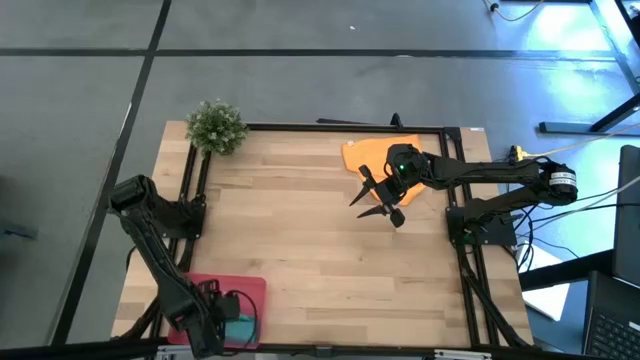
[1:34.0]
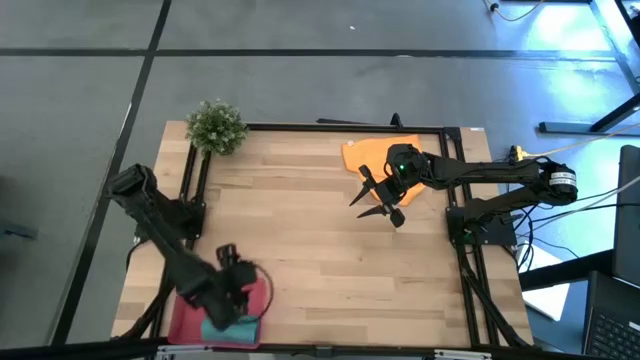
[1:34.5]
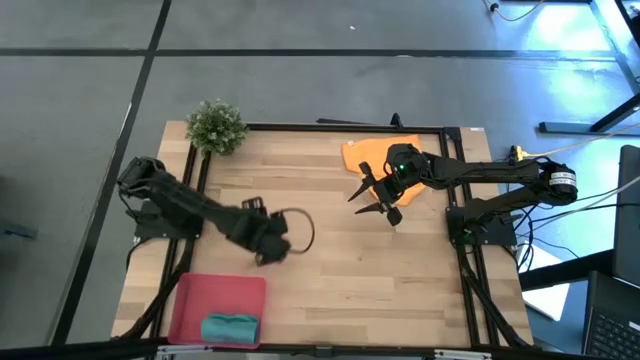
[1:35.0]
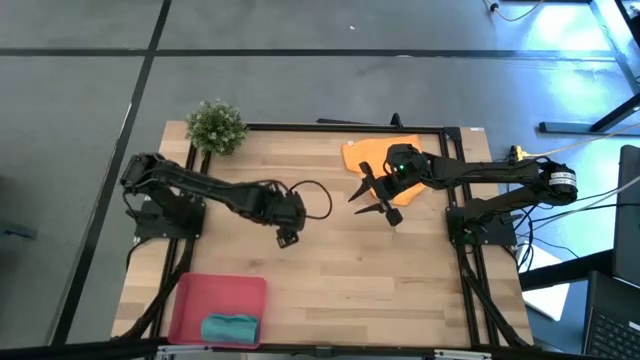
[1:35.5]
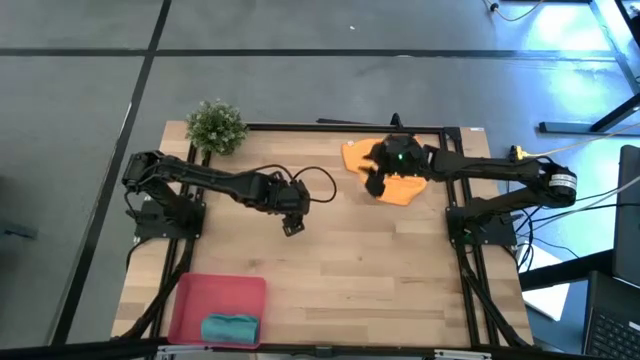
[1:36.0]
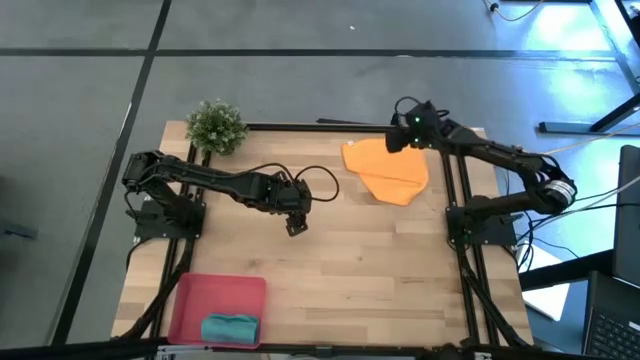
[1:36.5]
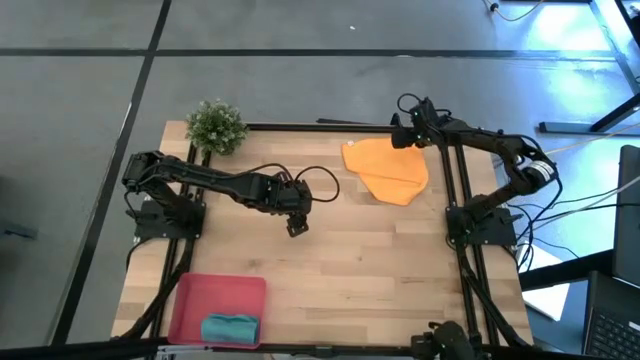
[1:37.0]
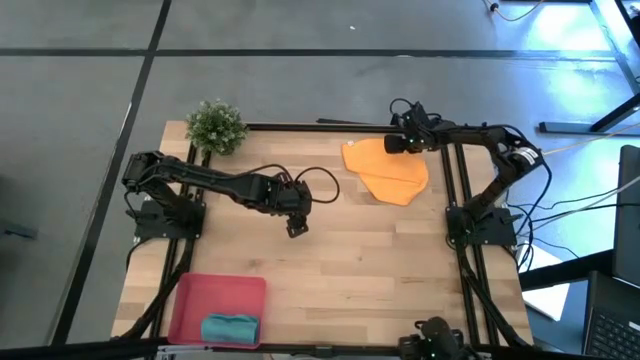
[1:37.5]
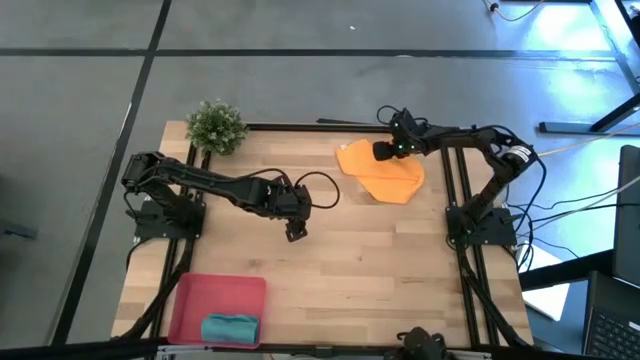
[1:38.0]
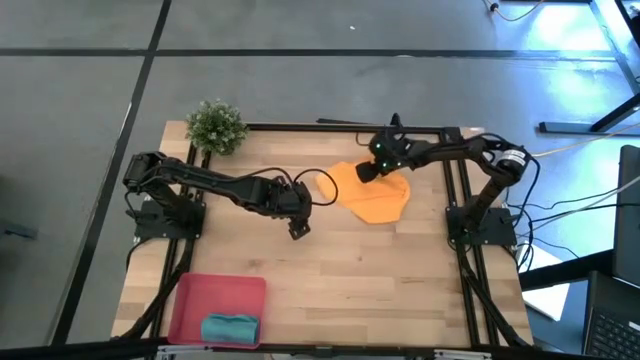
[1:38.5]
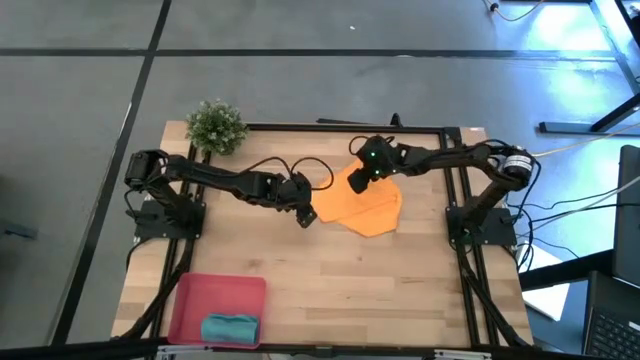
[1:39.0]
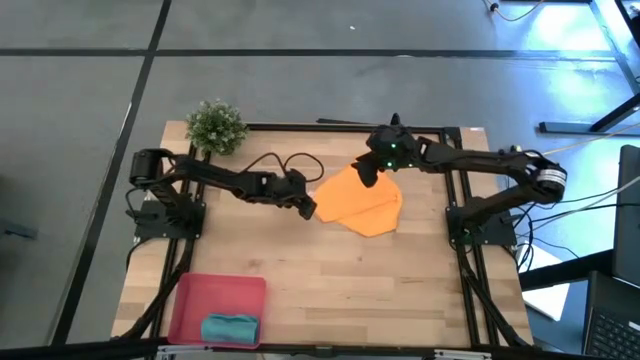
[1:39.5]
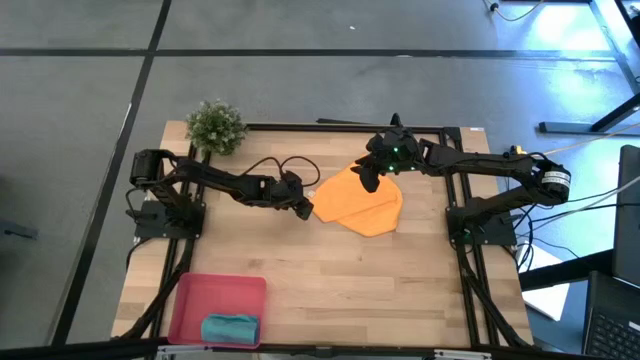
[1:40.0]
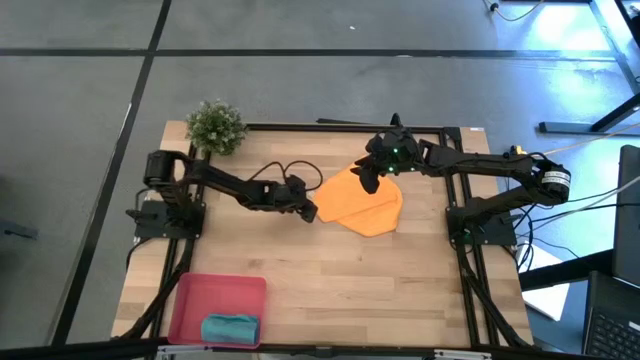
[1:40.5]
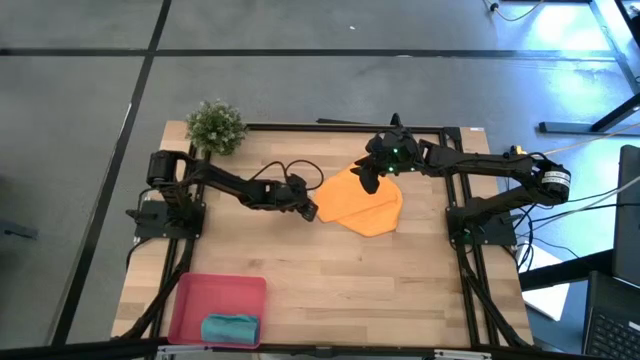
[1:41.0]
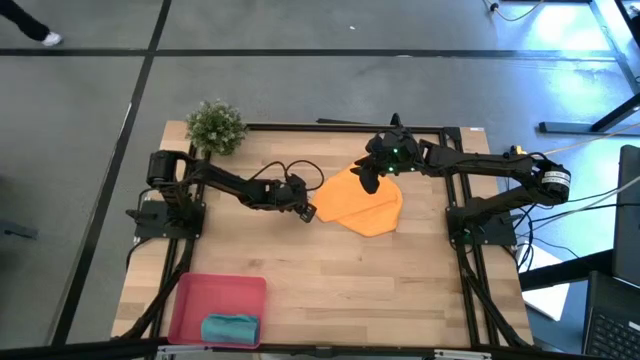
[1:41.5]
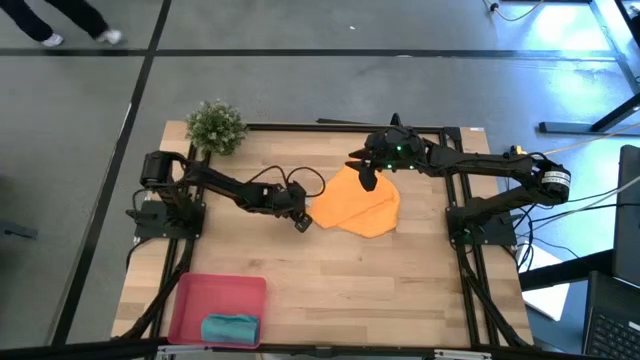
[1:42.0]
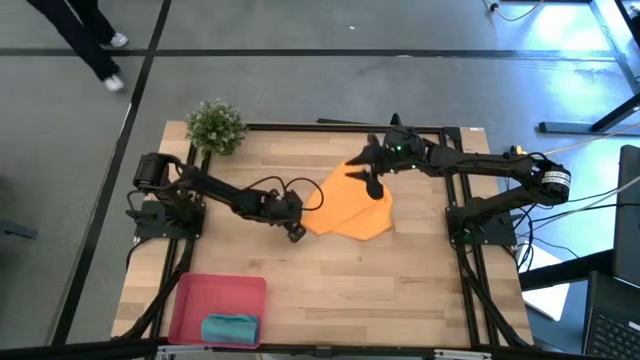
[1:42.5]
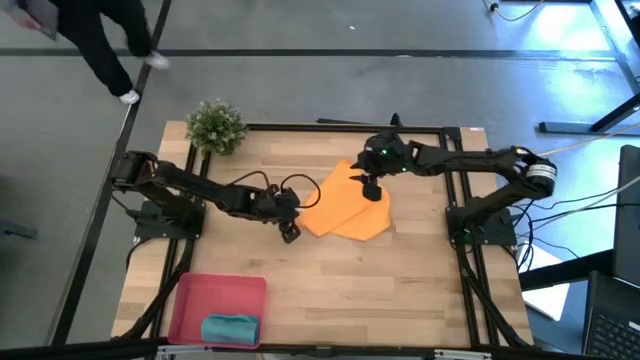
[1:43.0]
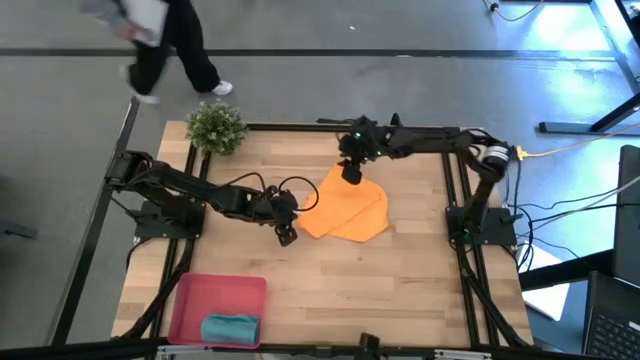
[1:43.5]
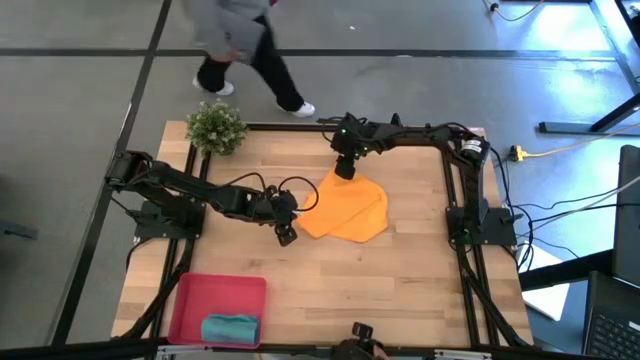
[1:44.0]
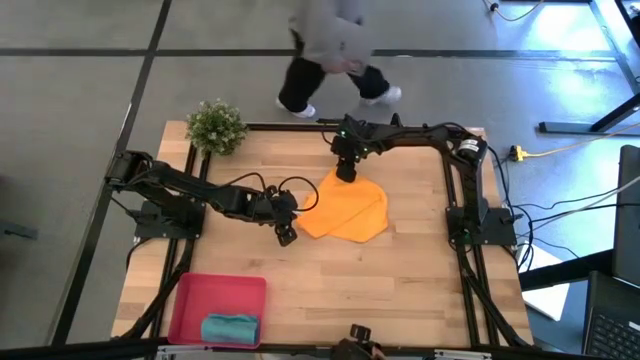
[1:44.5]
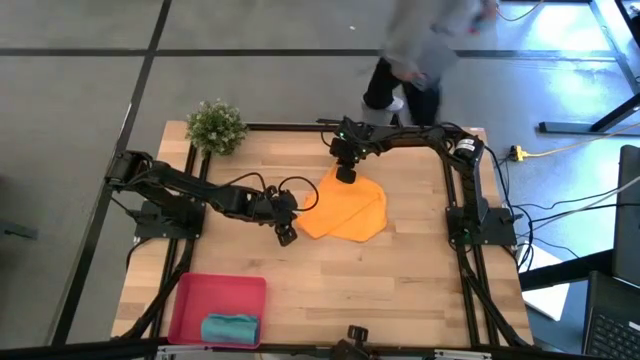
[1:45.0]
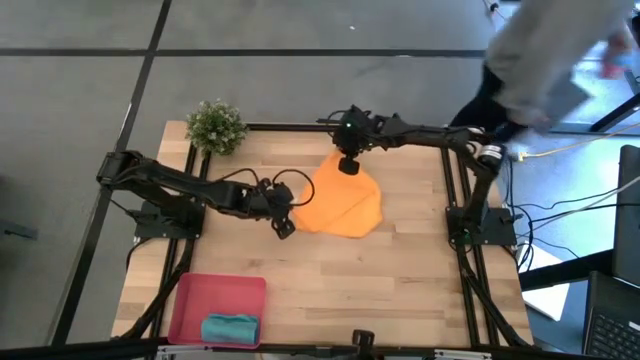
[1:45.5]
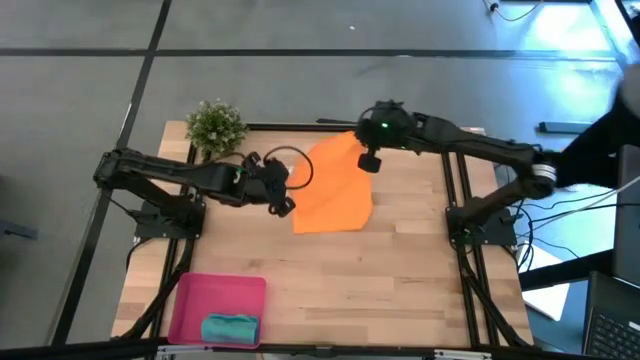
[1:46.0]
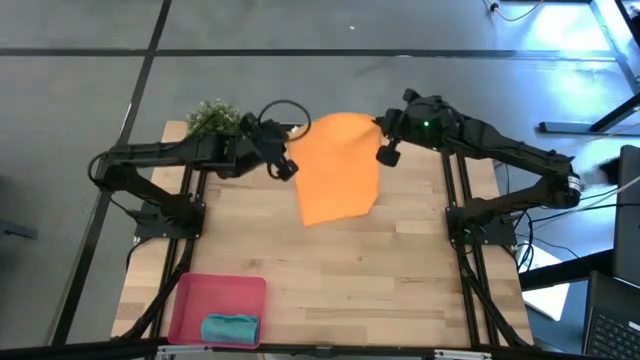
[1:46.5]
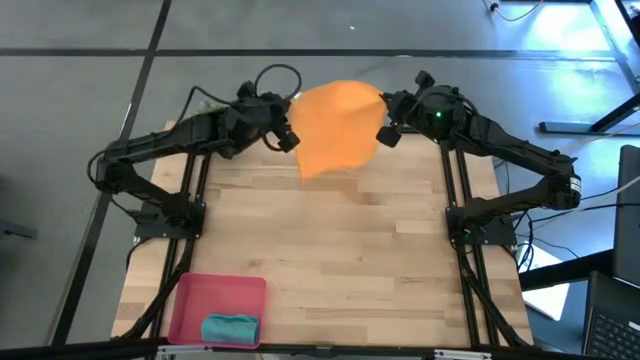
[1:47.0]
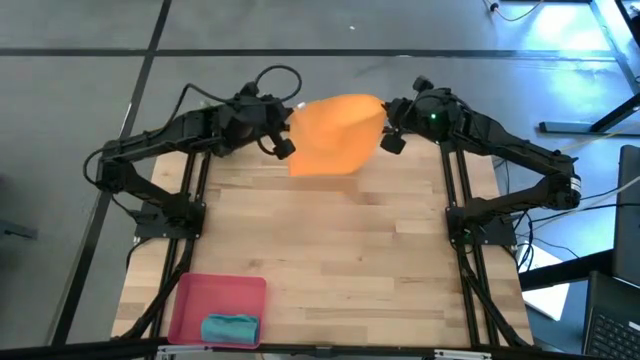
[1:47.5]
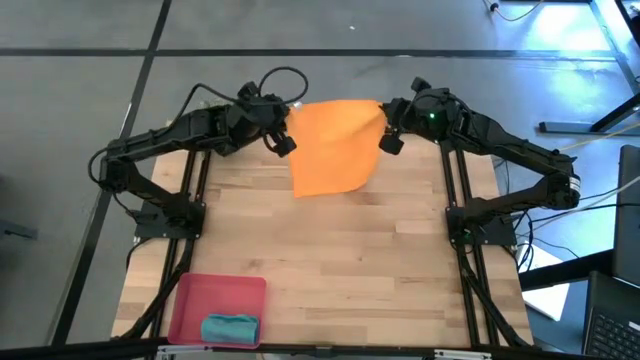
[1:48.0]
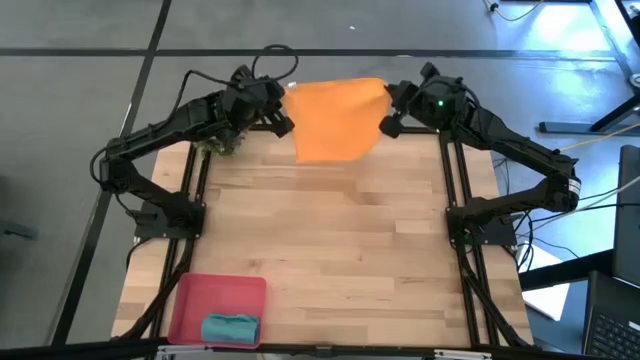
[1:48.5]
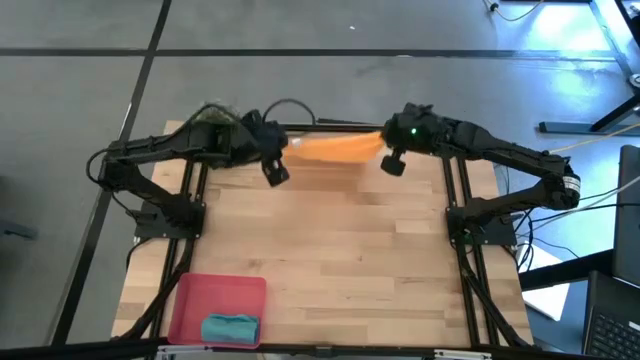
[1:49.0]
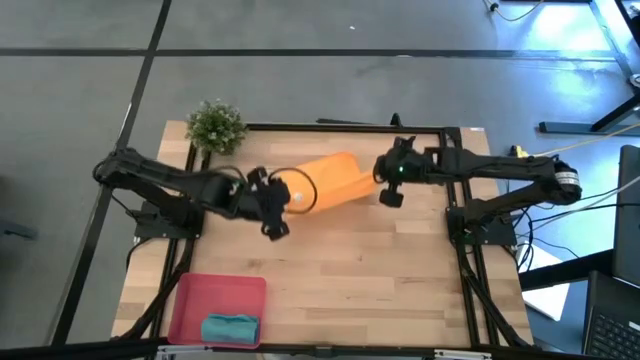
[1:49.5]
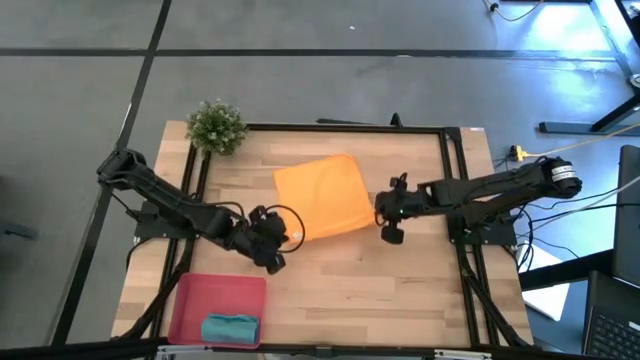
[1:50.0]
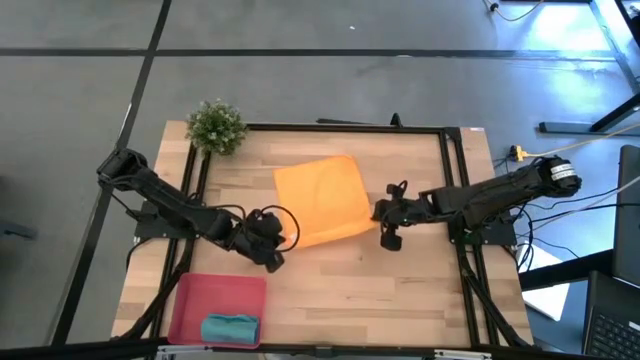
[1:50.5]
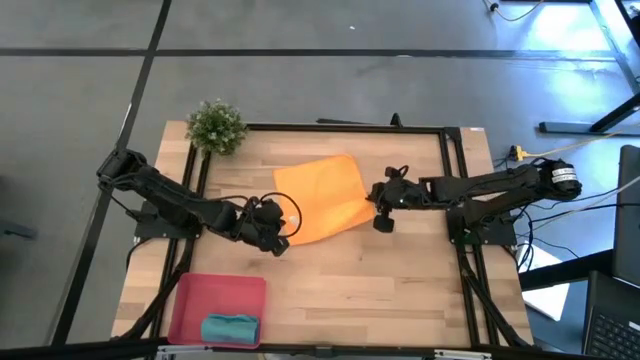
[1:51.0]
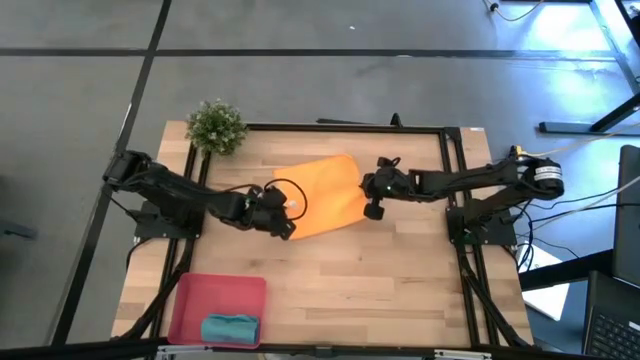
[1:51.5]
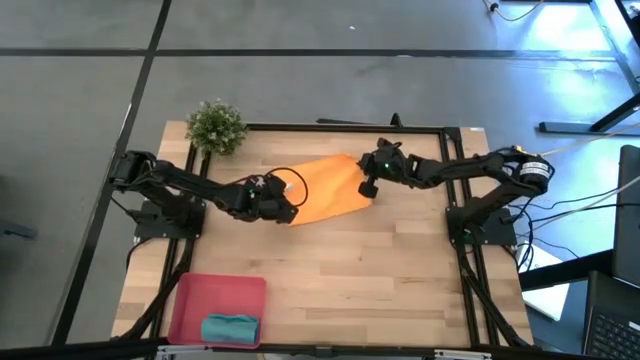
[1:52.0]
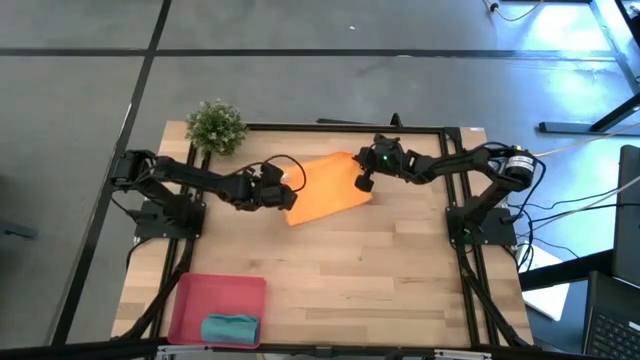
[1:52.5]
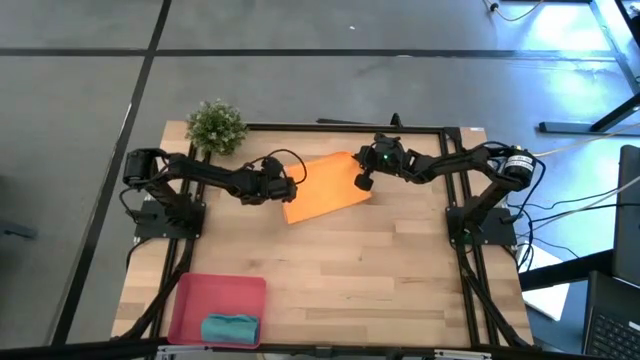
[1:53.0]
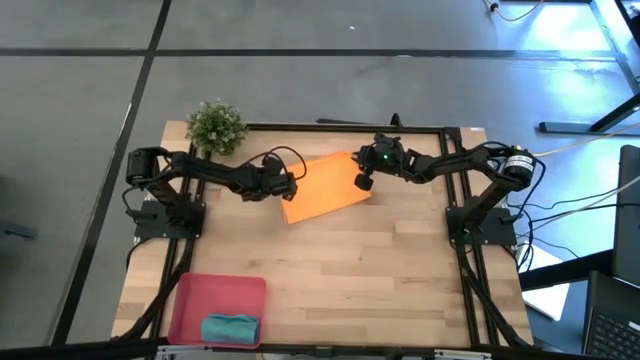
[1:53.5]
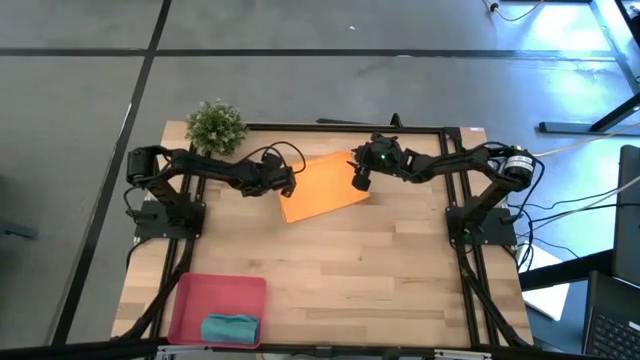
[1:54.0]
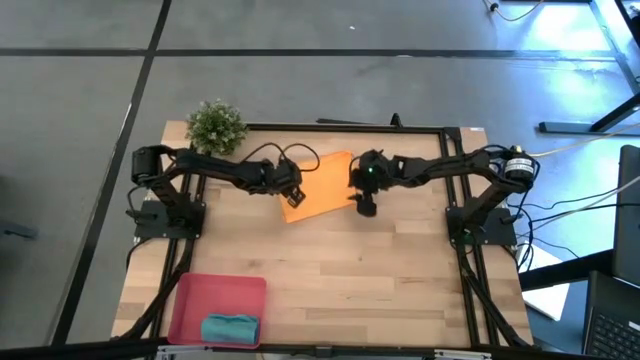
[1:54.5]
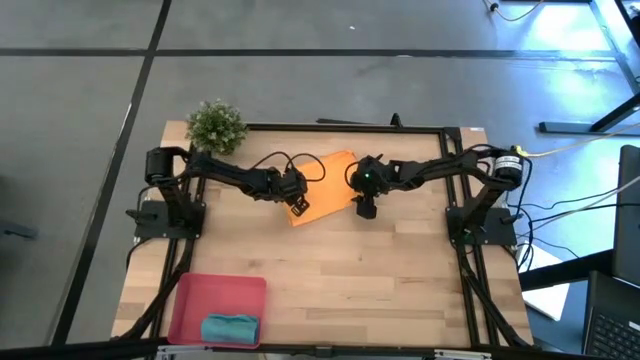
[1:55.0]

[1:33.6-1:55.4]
Task: Roll microfiber towels into tight, uniform cylinder then place into a basket
Fold the orange microfiber towel
